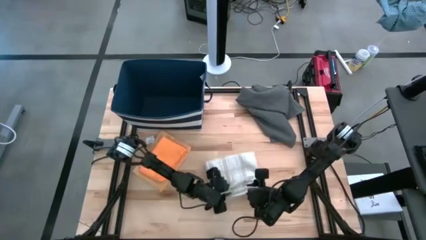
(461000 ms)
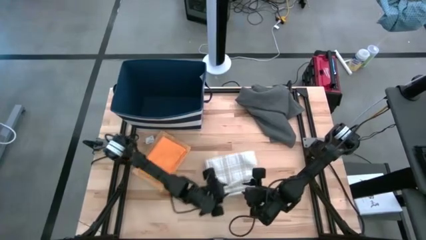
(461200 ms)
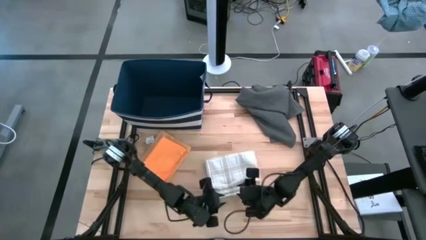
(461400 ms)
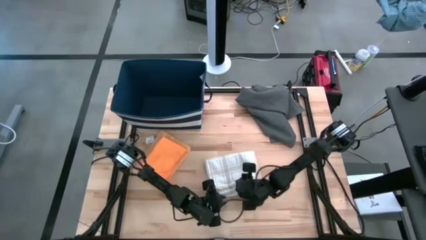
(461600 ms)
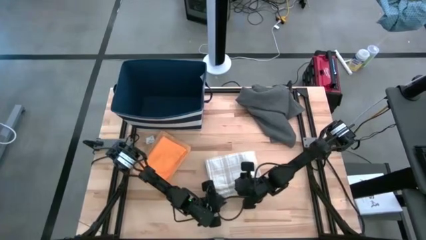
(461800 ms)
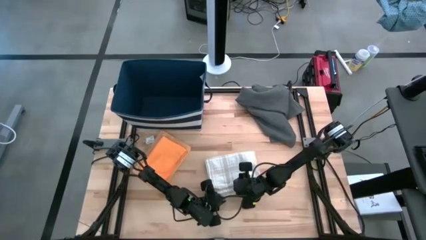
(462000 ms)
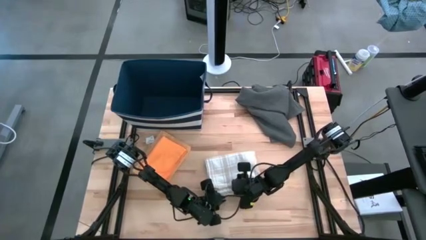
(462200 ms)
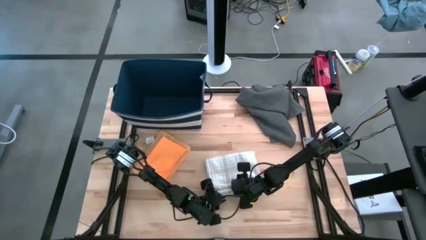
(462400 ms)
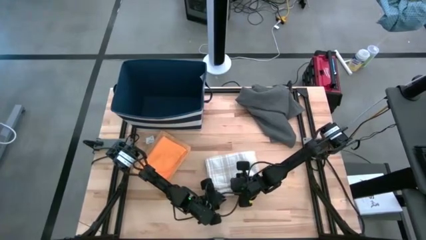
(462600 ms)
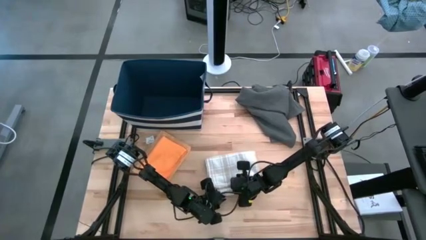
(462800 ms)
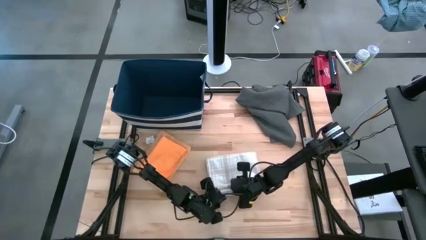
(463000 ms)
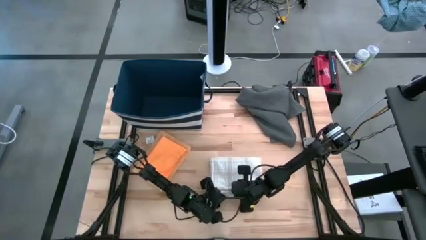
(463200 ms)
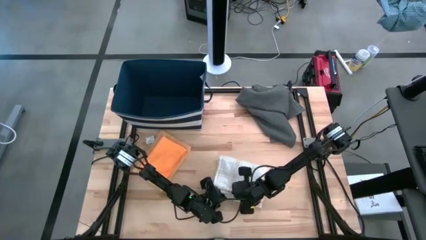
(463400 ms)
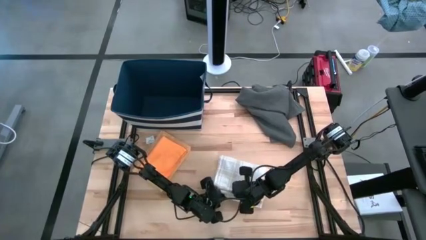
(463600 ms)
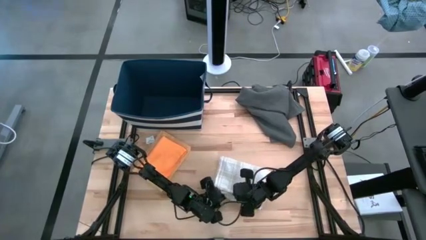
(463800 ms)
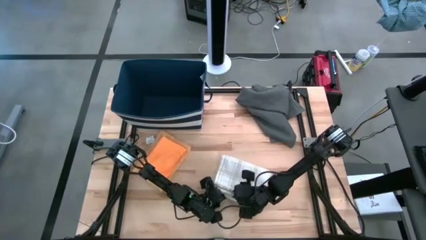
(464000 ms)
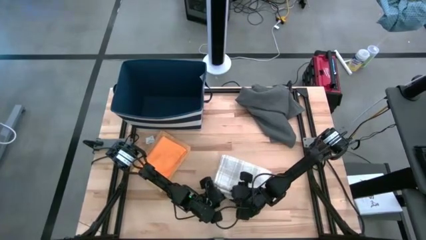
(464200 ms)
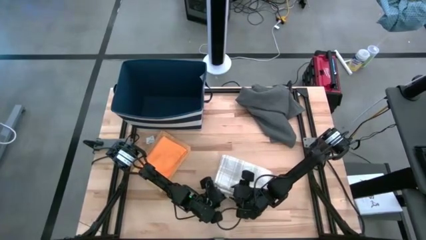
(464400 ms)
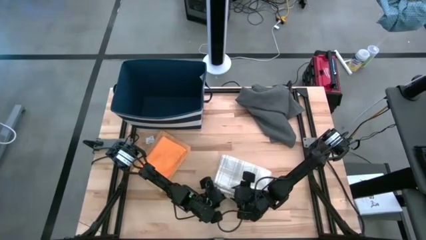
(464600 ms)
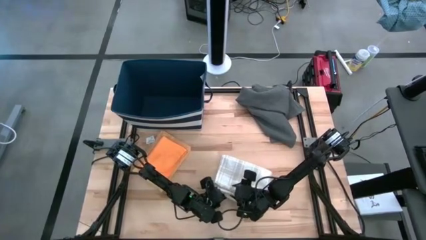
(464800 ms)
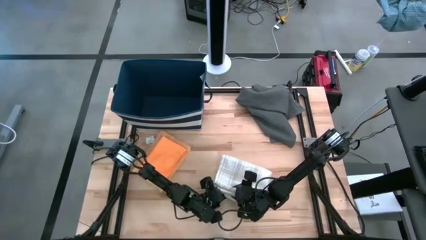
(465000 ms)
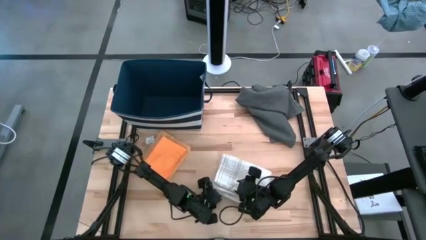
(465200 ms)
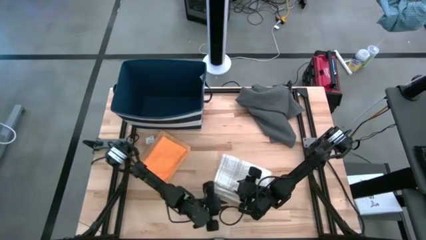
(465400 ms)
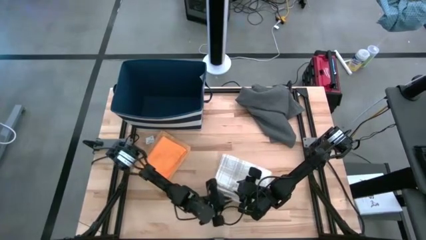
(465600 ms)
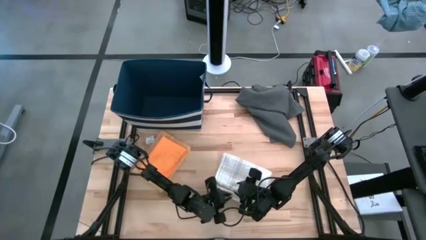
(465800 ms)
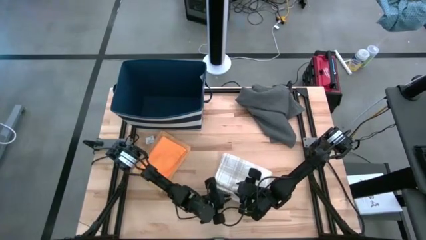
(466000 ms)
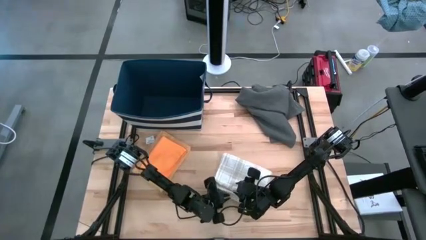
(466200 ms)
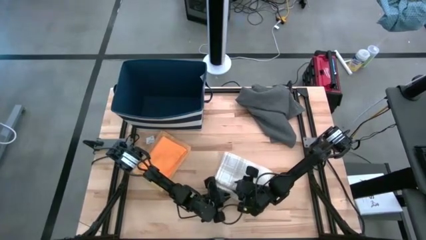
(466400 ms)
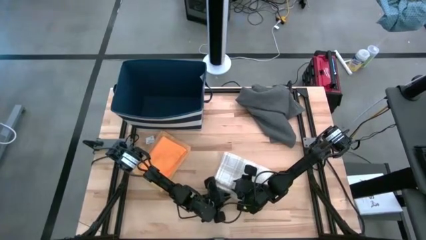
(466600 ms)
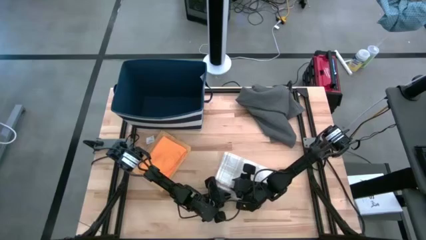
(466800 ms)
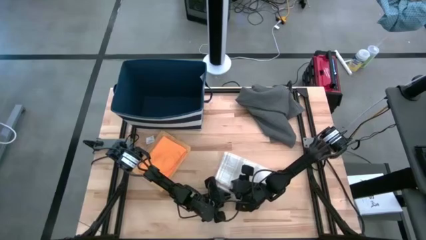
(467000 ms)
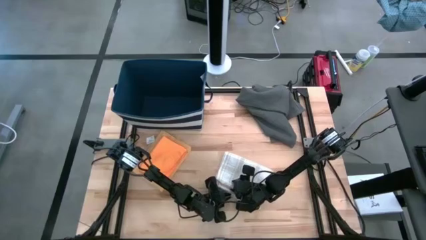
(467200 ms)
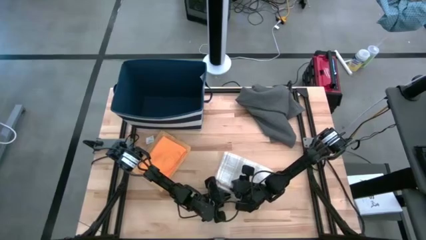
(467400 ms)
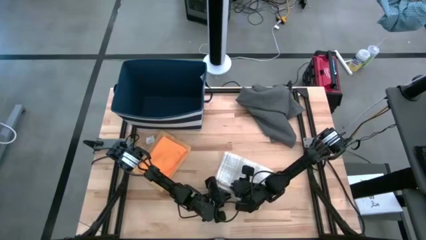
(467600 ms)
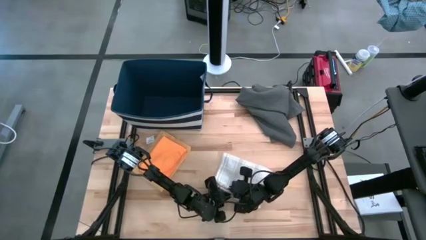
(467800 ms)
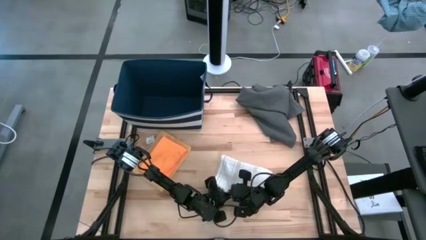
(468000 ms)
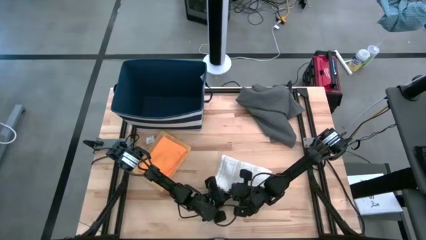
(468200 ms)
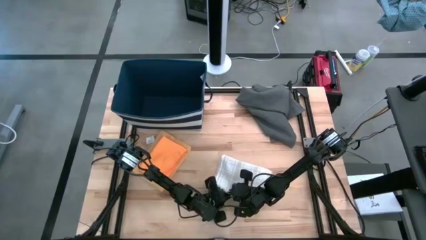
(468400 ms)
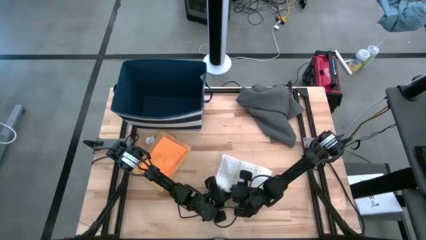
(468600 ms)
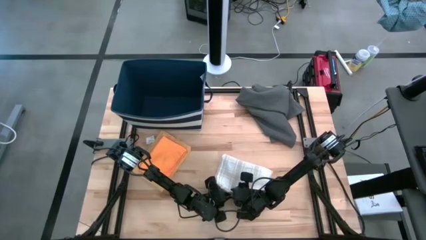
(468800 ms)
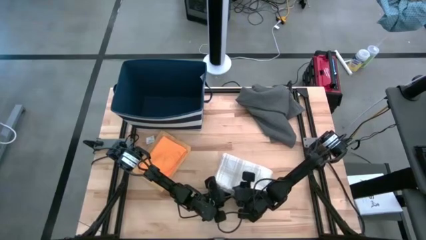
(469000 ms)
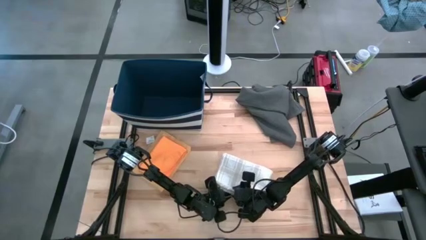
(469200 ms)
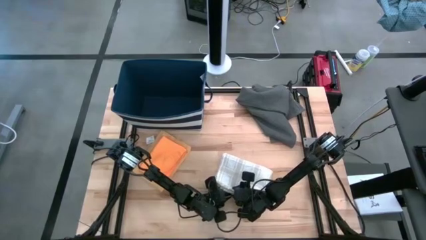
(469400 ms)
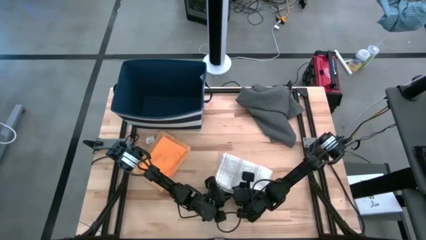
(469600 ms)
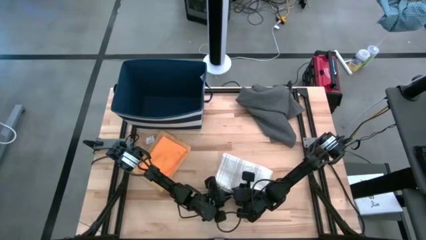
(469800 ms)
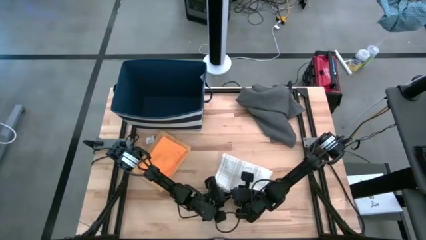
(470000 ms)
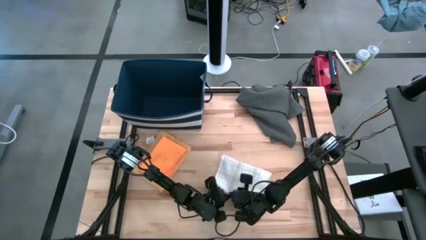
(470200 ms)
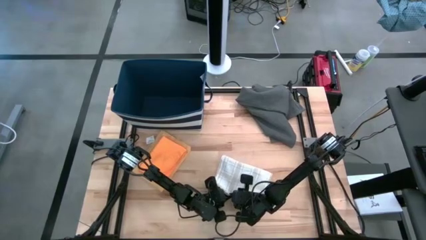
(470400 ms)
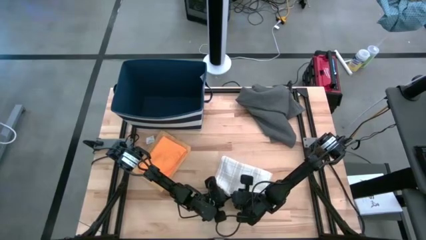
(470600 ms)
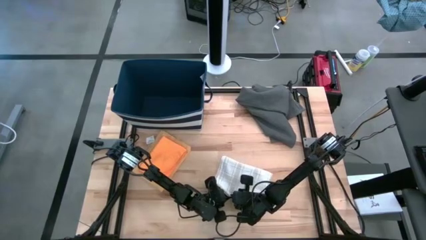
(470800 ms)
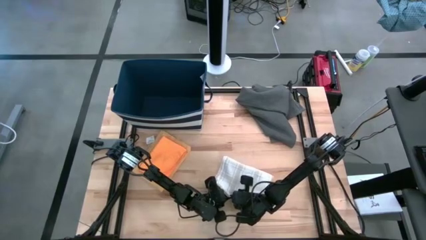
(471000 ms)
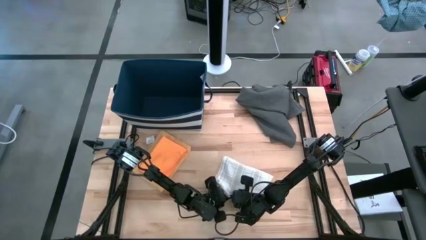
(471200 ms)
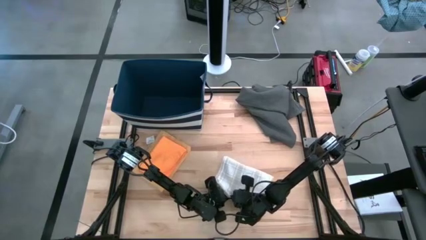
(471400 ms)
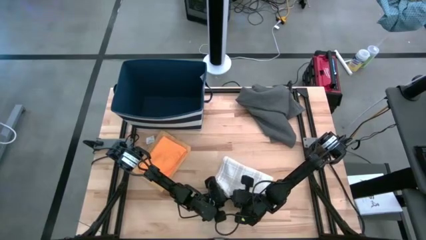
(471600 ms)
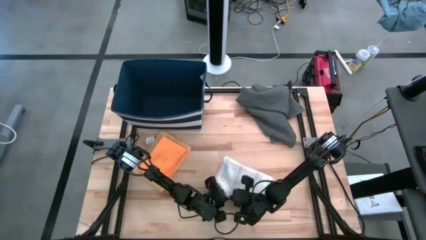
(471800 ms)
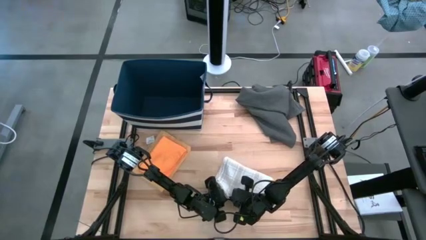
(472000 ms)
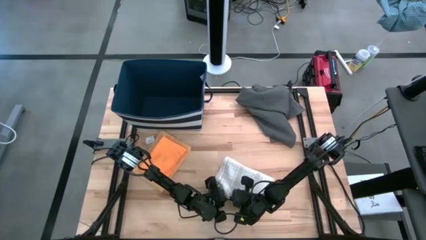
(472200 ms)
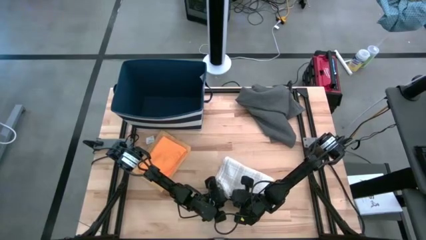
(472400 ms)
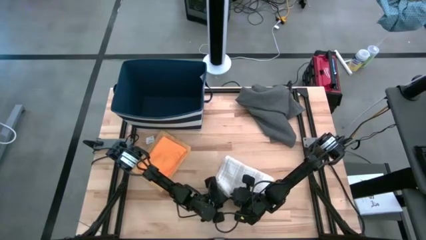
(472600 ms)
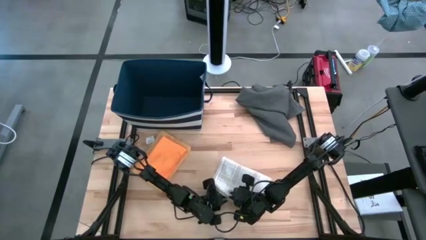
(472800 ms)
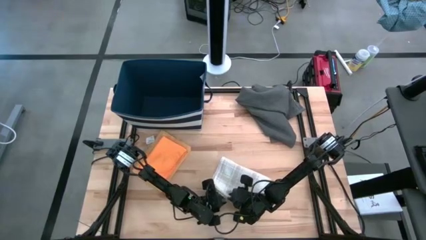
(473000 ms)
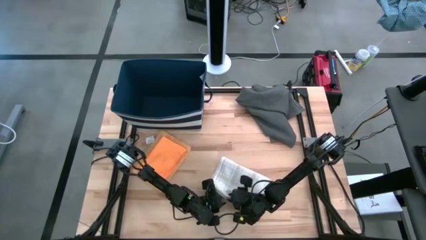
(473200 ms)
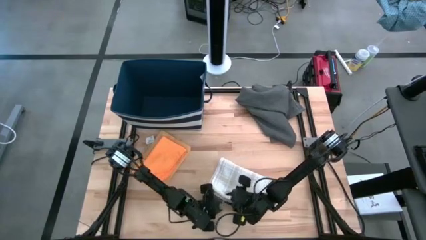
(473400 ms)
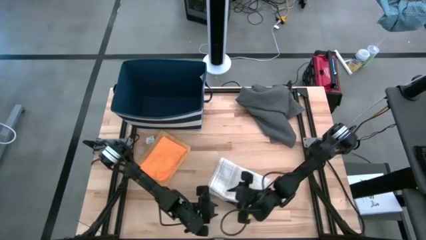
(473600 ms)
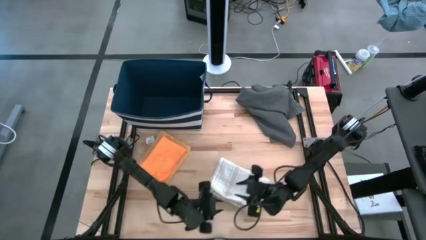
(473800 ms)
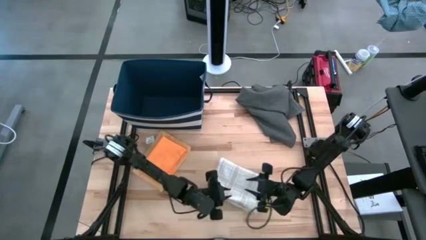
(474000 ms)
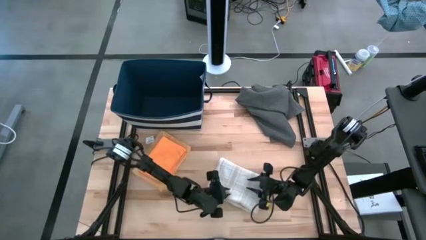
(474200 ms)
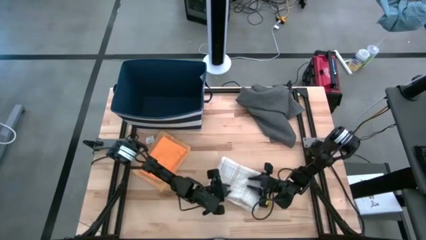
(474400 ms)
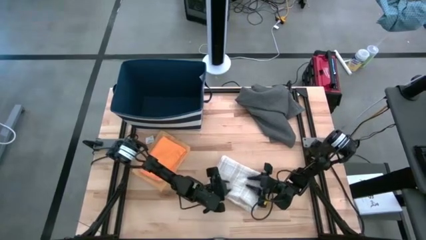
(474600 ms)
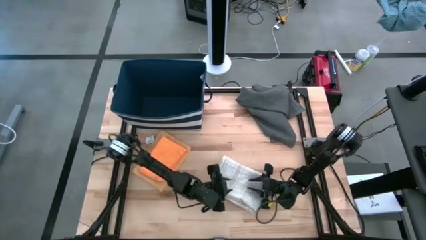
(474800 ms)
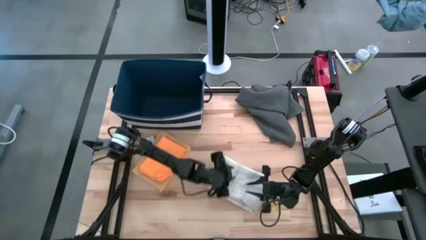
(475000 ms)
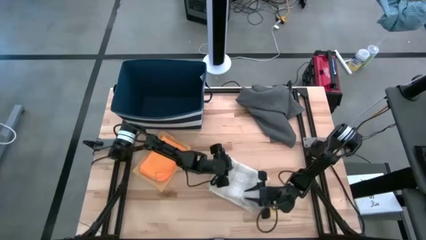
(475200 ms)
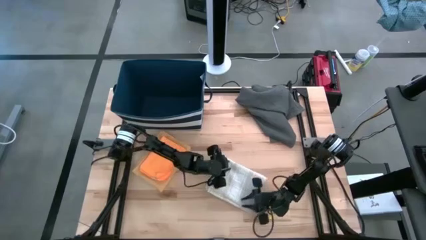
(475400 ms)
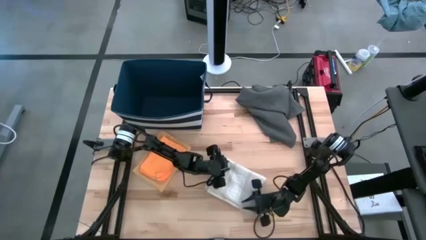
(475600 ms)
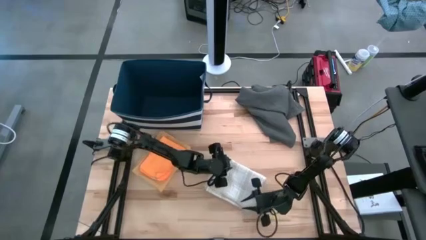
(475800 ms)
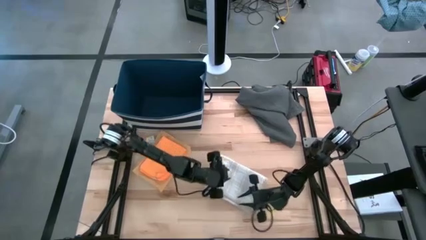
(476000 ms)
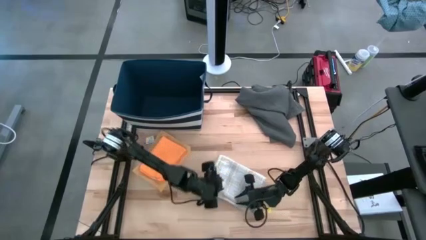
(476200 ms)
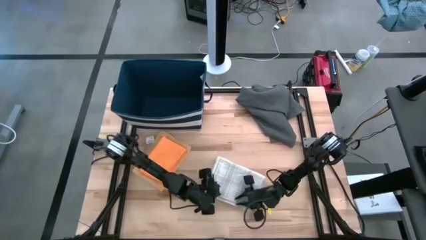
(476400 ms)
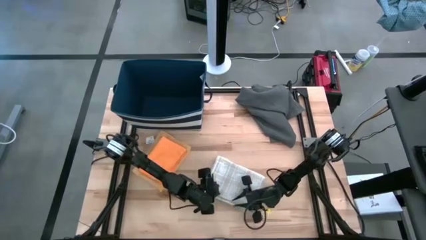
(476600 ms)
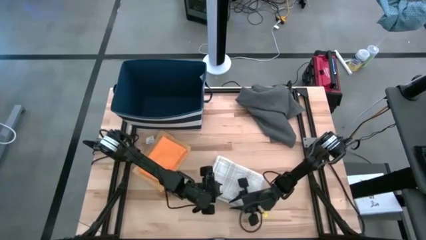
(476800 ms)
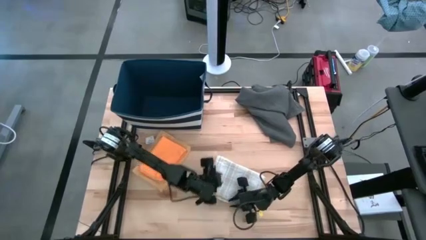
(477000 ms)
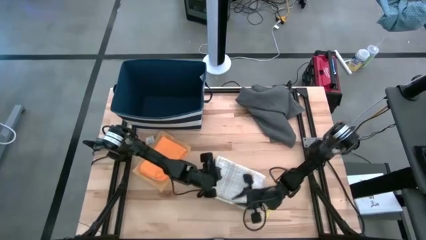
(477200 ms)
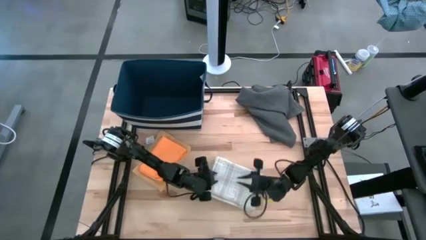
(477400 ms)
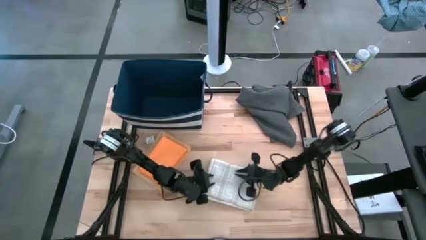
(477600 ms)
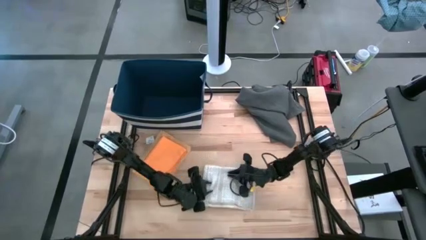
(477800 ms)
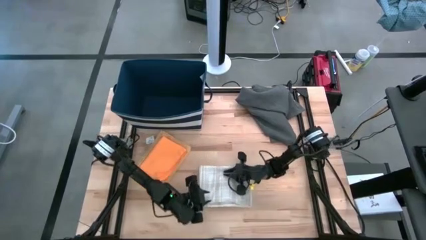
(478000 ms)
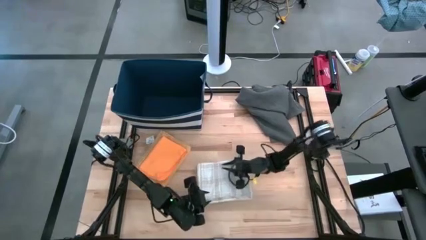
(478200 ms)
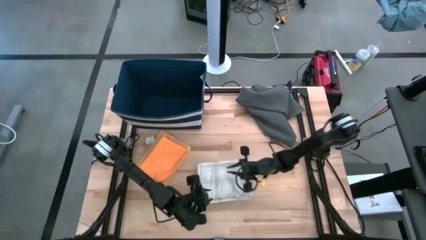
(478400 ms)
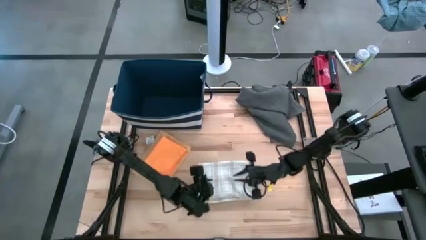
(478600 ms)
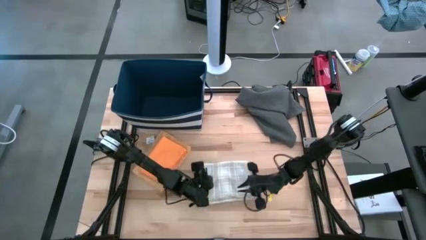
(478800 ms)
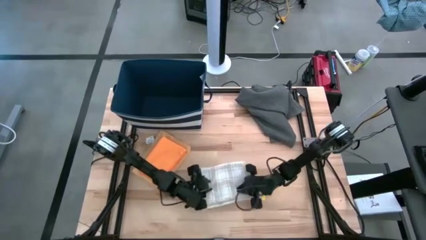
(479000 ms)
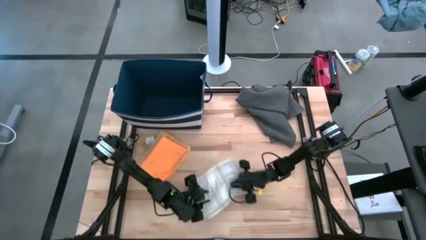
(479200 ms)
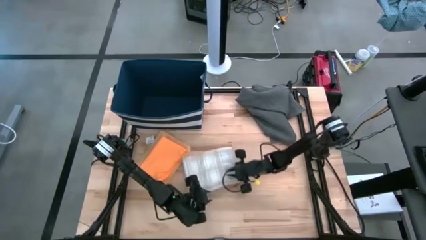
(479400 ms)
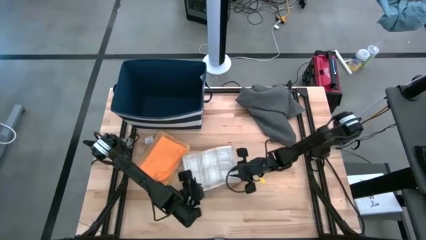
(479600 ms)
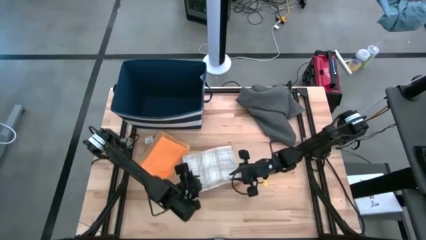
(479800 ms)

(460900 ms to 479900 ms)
Task: Fold towel
Fold the white patterned kitchen towel
